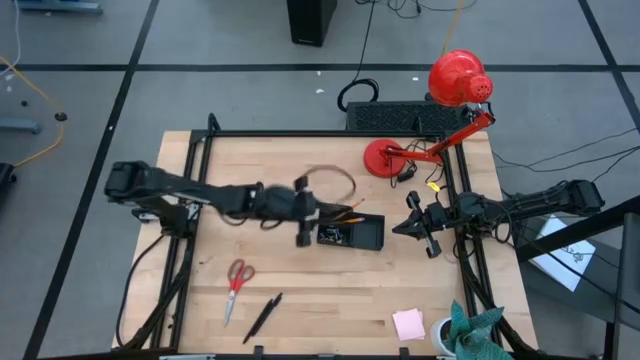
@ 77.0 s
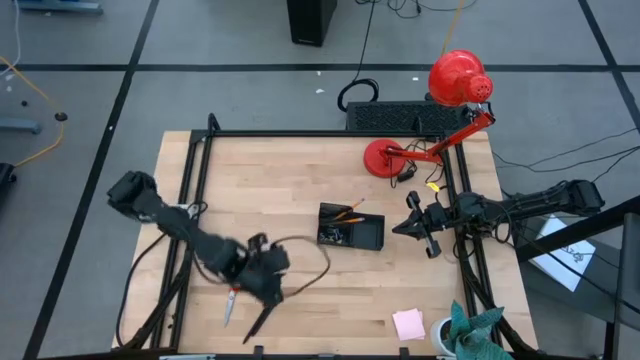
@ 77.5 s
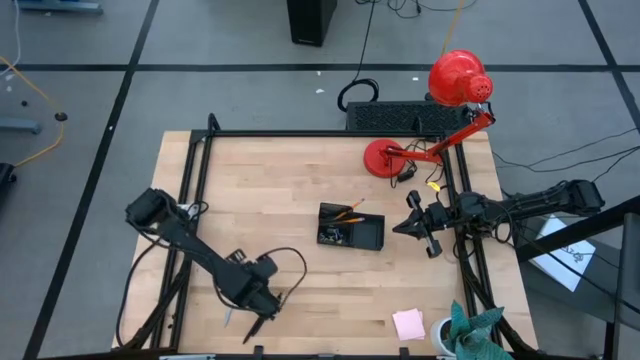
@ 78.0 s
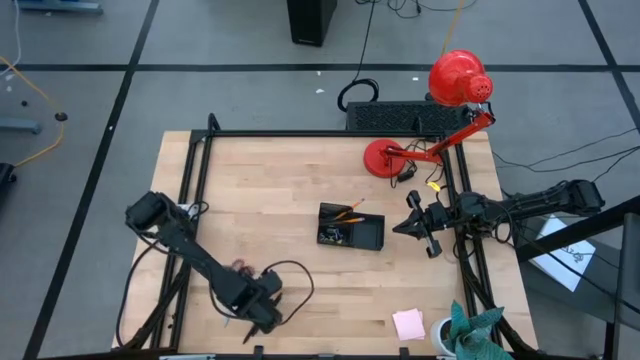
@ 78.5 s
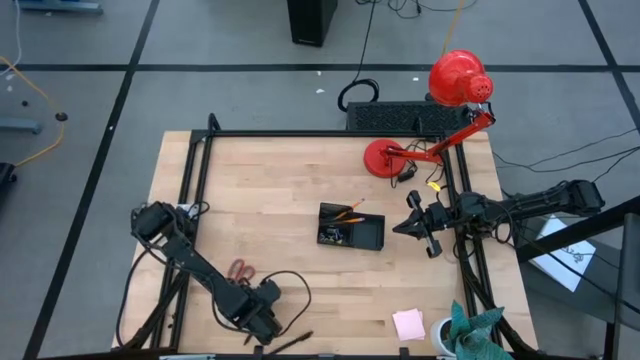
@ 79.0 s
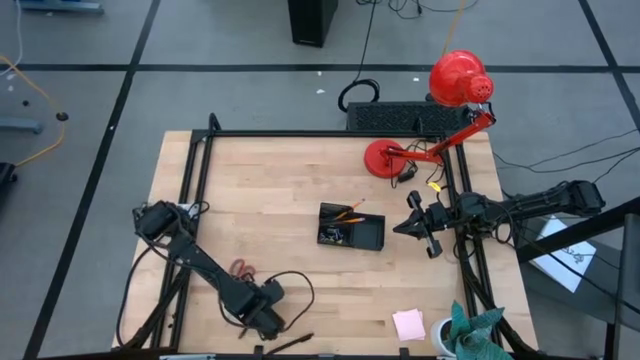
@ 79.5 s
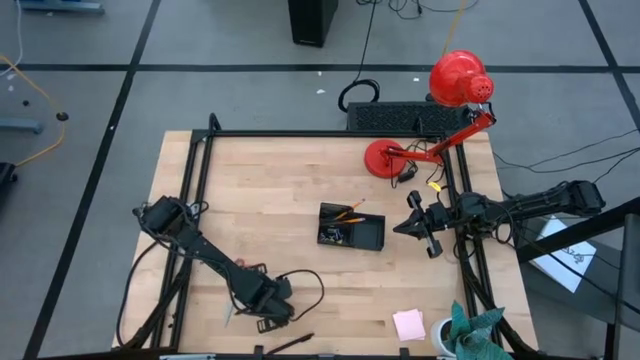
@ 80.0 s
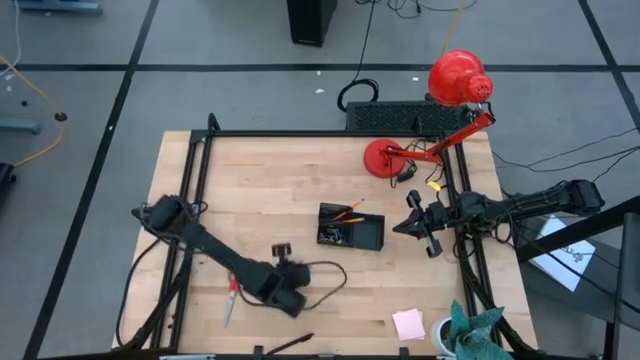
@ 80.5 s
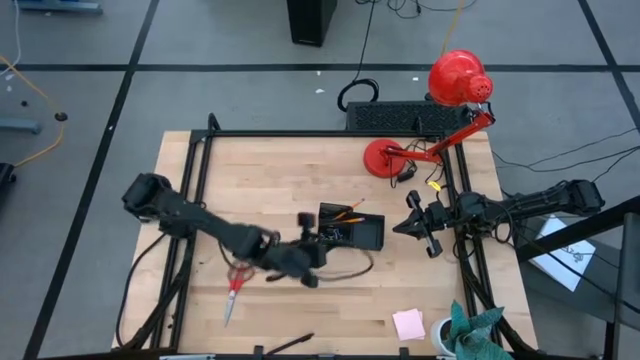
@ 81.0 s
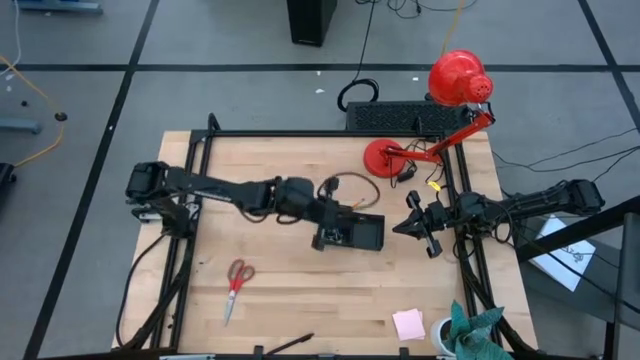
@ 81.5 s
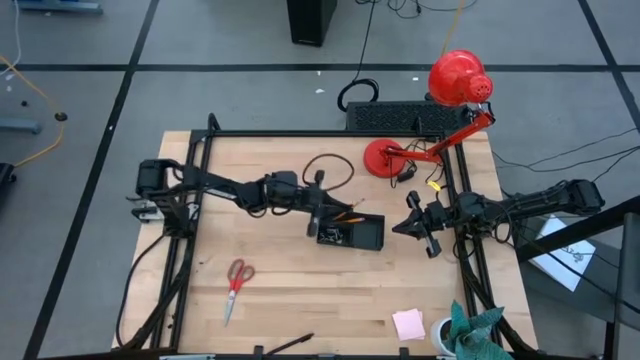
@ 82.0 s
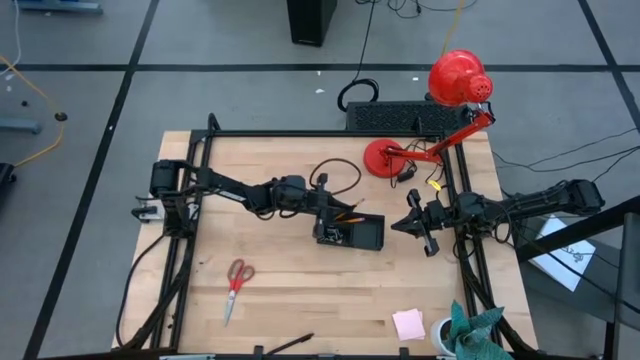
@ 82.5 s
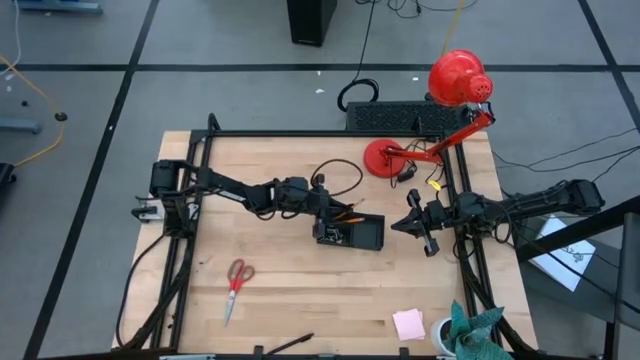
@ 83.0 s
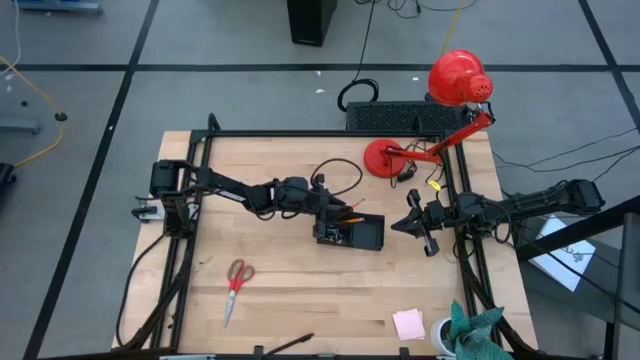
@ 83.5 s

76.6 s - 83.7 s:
Task: Pick and place office supplies into organizer
Put the black pen into the desk organizer

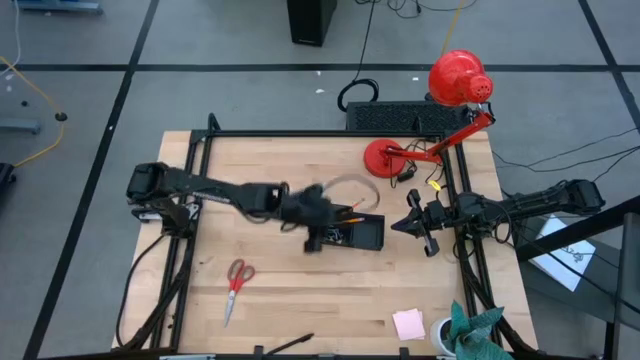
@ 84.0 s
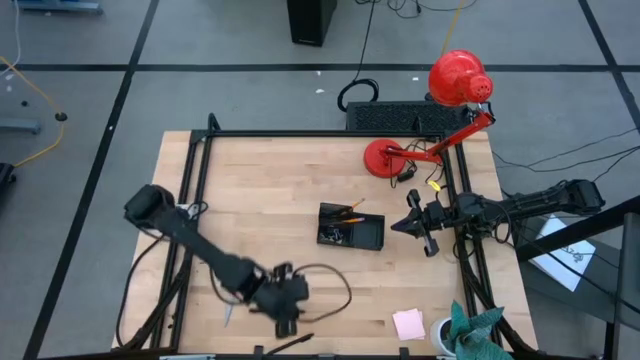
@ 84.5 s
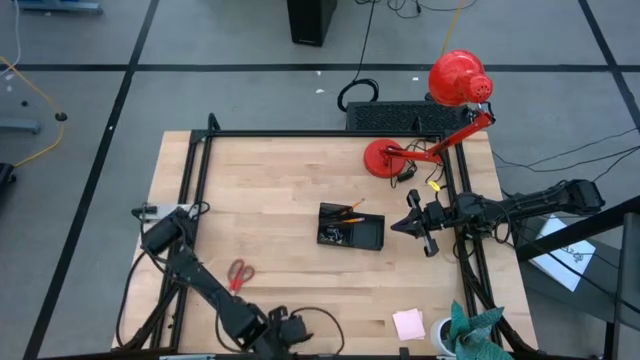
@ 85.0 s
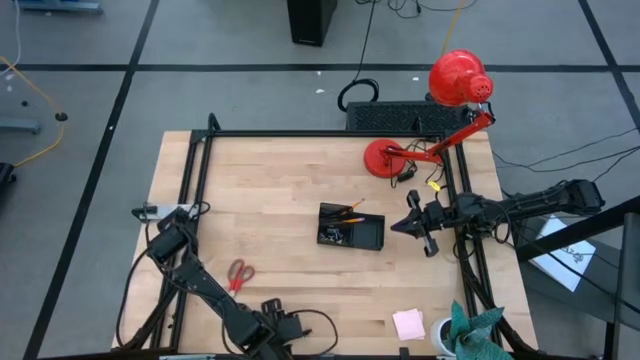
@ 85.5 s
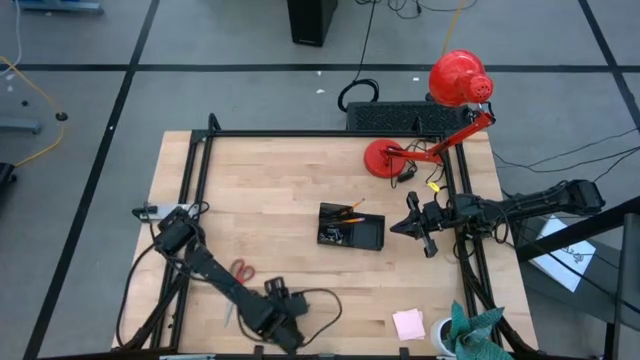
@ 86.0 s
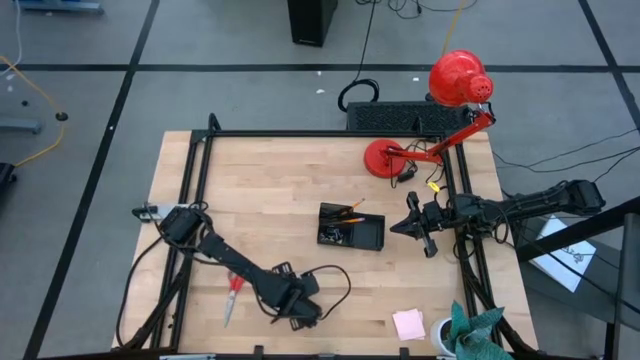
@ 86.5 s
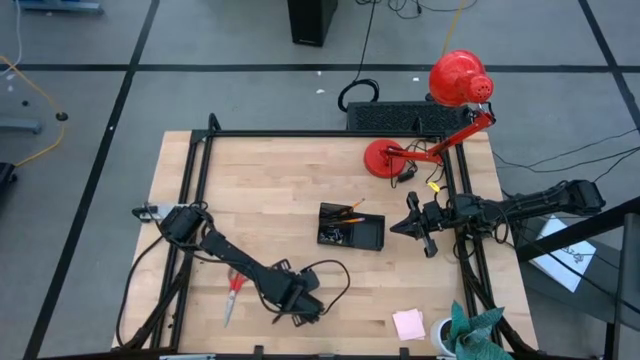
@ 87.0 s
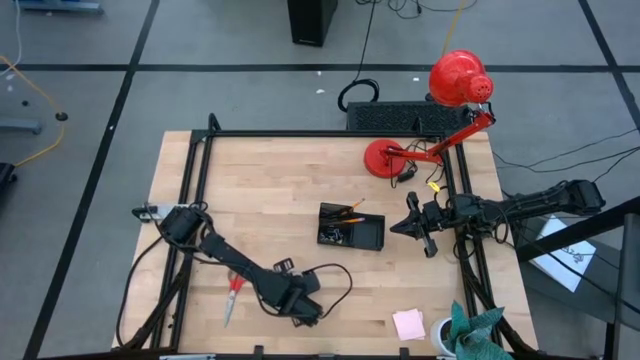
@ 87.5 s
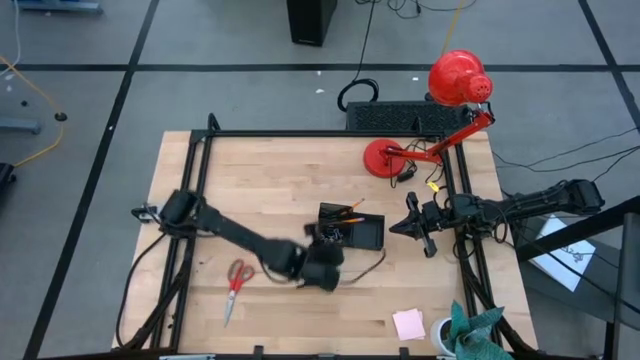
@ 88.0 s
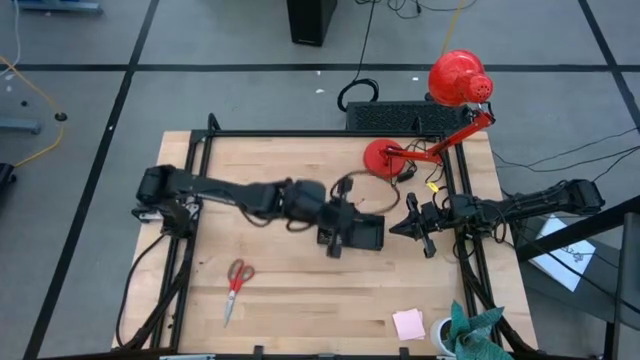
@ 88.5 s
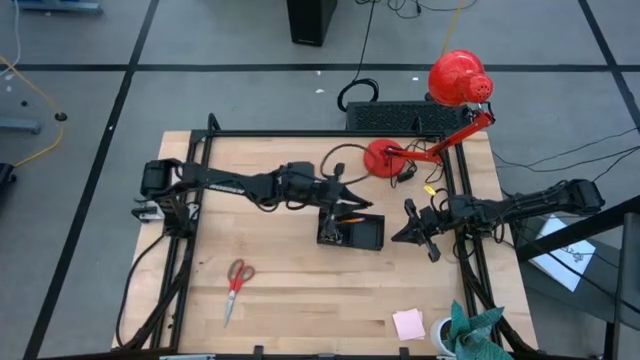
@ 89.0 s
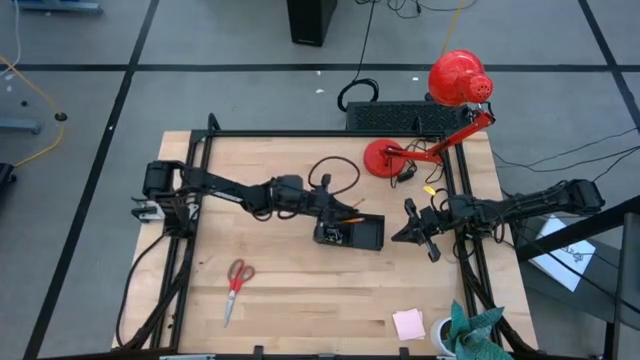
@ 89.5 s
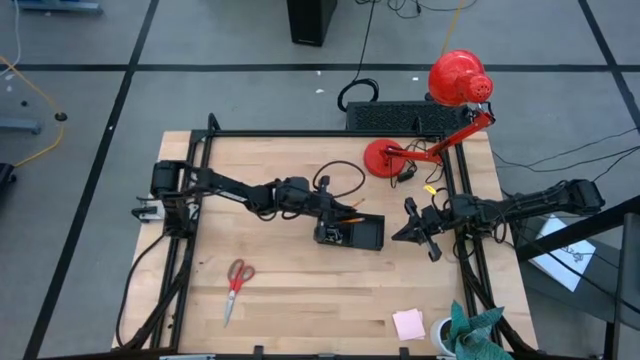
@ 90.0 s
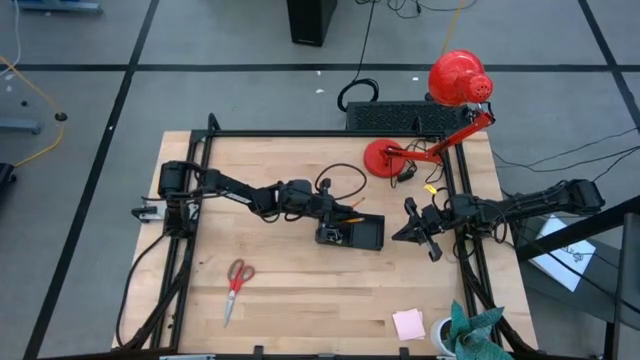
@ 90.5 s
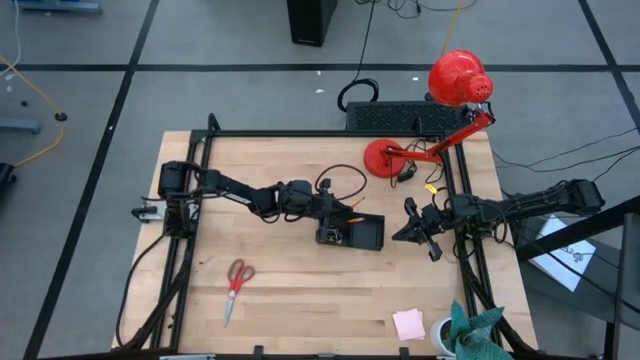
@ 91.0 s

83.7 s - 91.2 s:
Put the black pen into the desk organizer

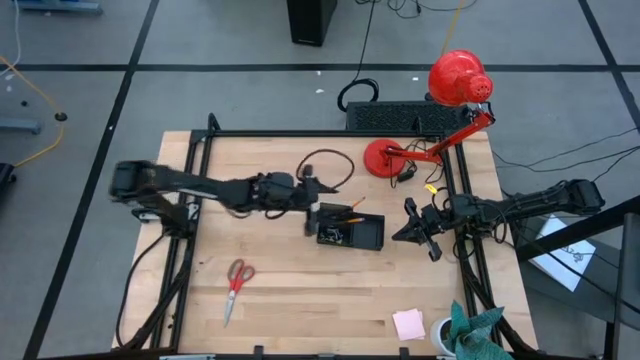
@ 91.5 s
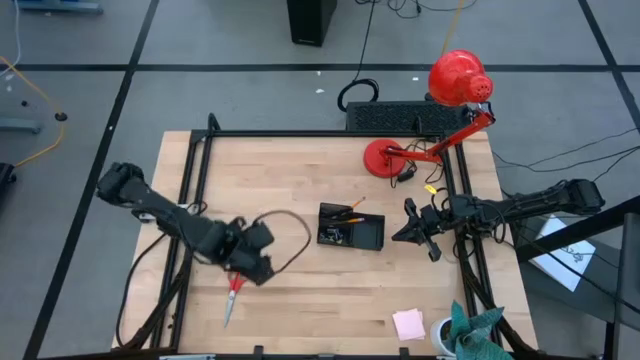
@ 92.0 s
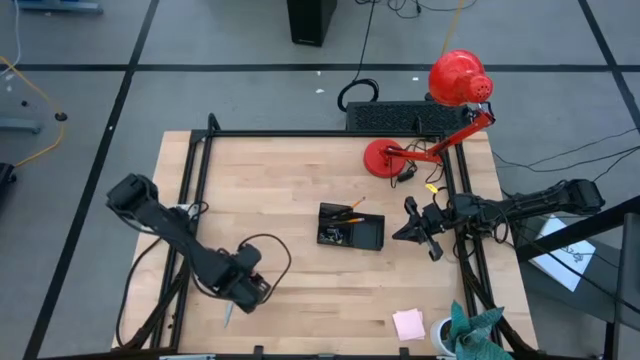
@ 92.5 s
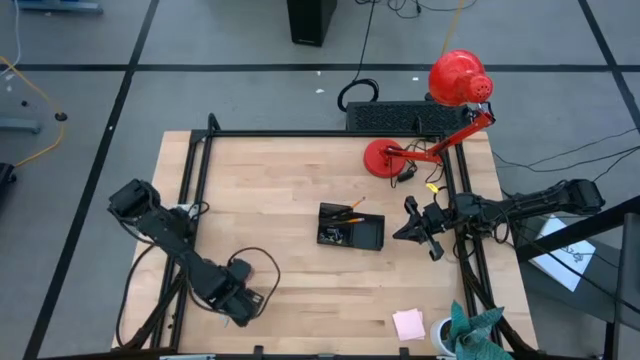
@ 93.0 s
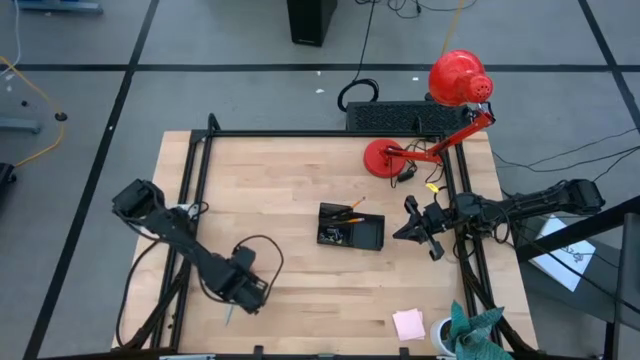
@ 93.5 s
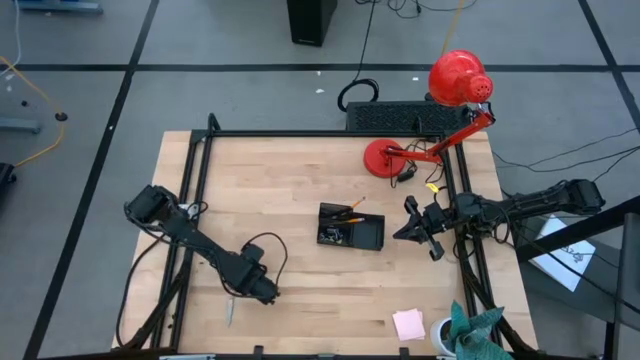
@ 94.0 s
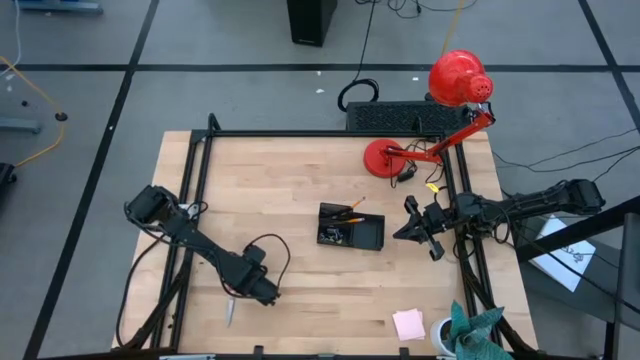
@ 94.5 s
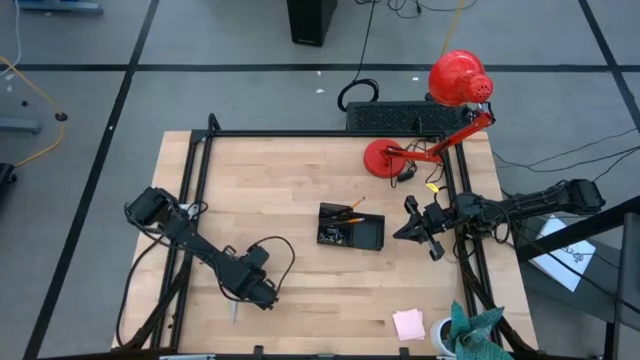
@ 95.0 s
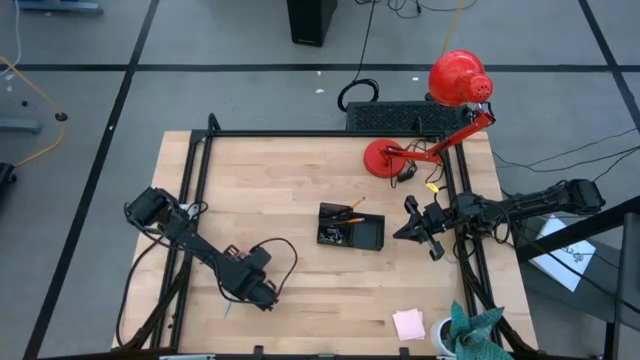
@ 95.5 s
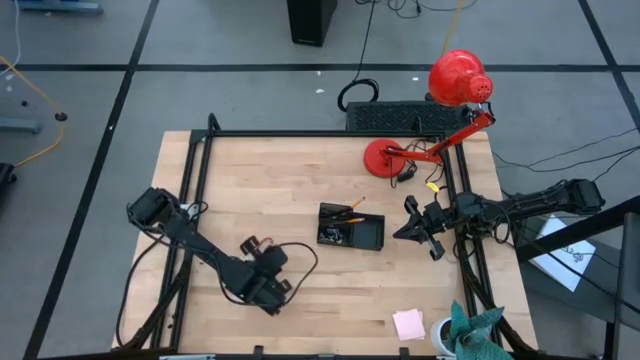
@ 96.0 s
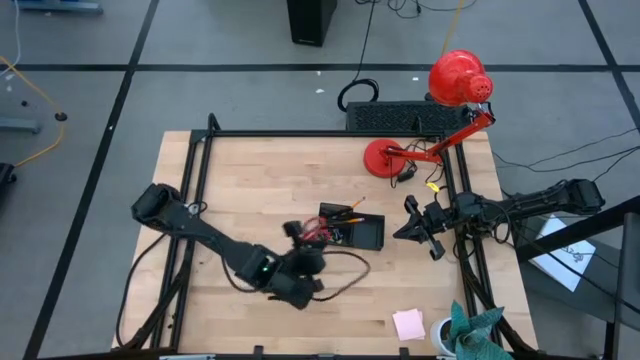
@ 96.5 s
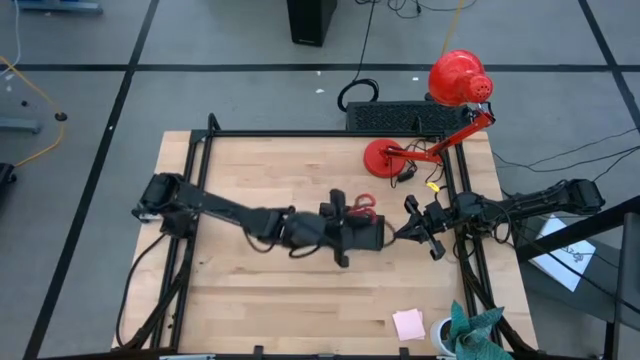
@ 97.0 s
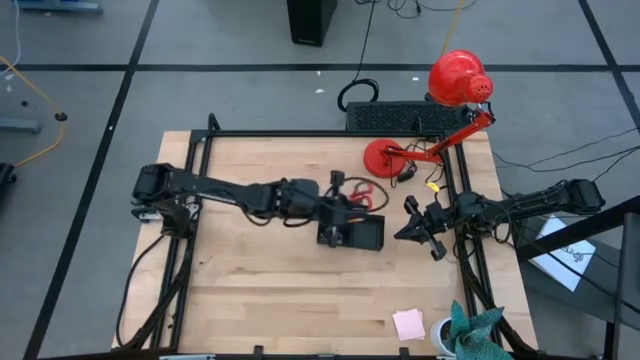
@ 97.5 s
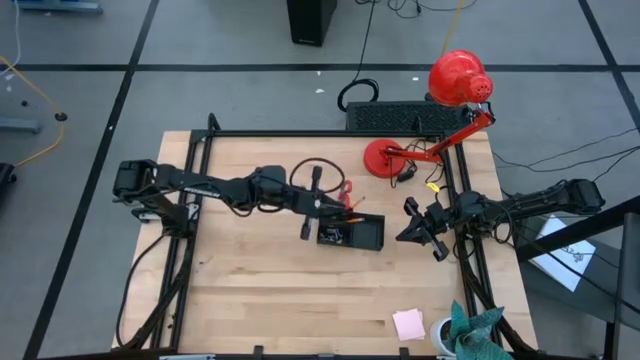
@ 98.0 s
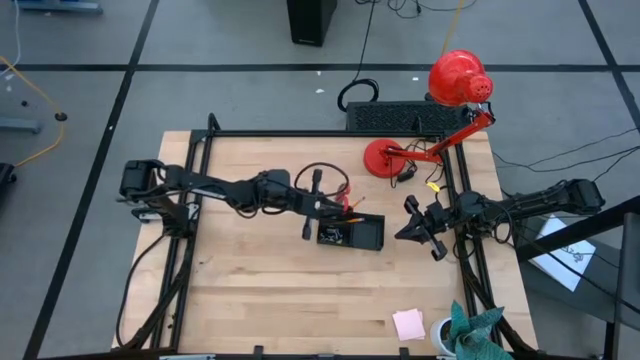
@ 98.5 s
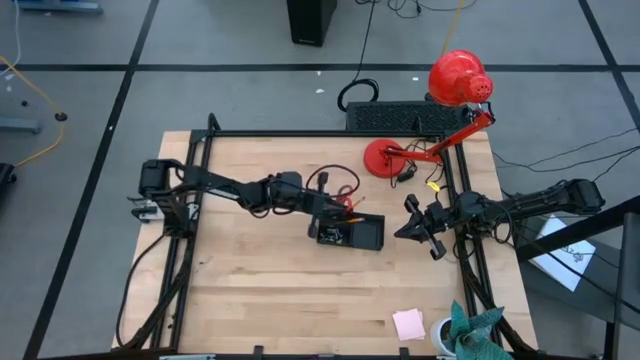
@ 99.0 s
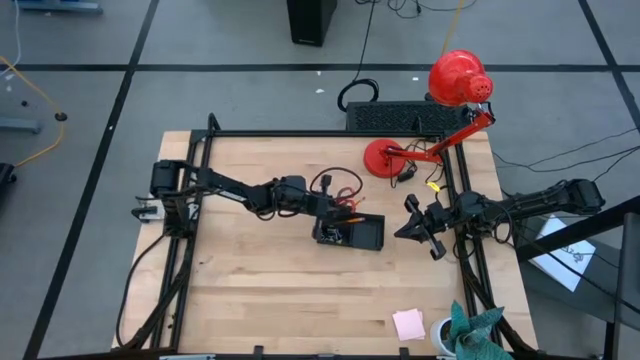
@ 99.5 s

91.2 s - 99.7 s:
Put the red scissors into the desk organizer
